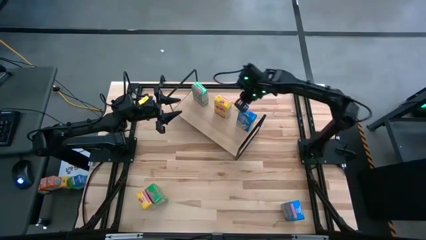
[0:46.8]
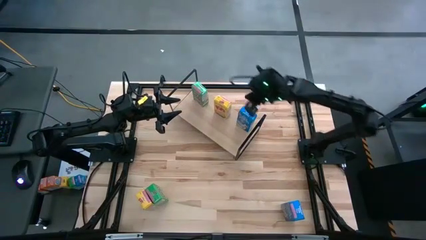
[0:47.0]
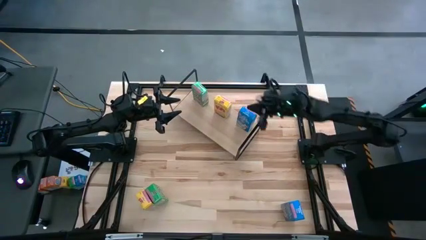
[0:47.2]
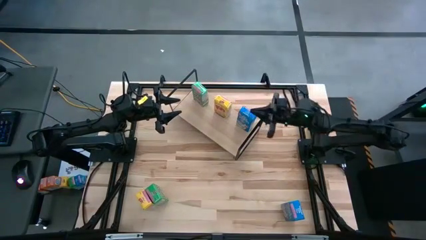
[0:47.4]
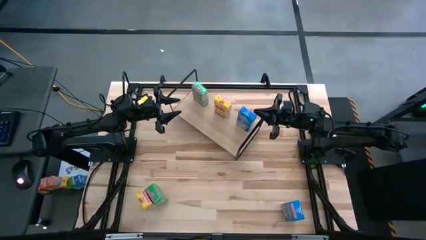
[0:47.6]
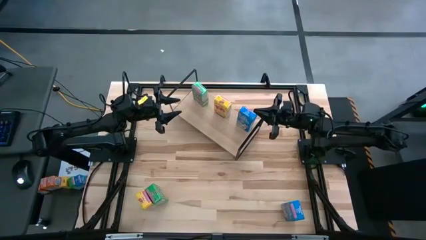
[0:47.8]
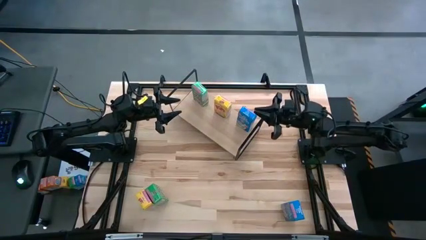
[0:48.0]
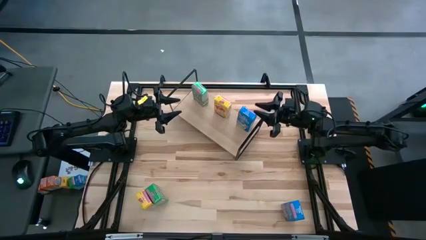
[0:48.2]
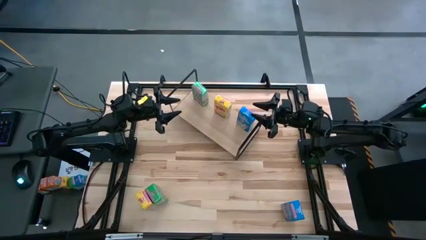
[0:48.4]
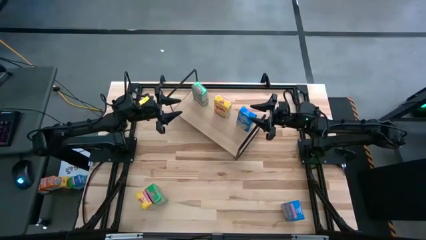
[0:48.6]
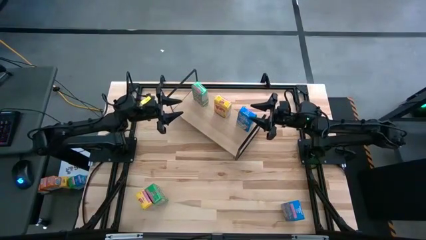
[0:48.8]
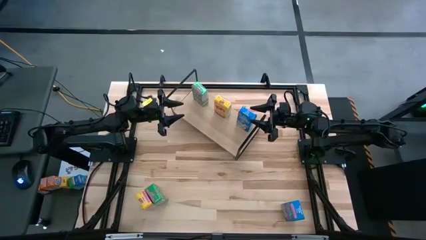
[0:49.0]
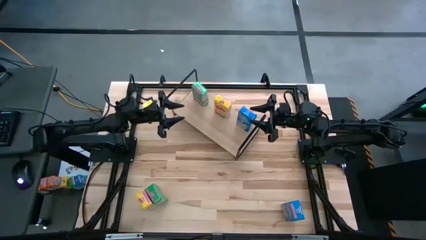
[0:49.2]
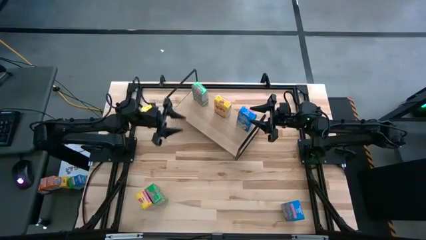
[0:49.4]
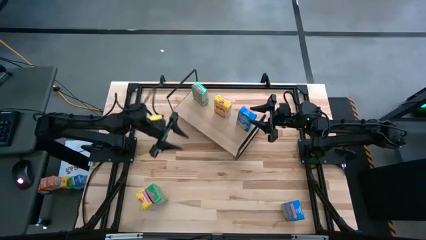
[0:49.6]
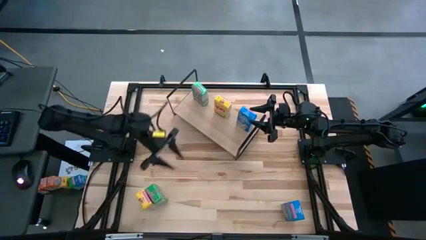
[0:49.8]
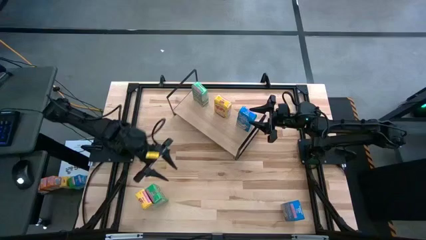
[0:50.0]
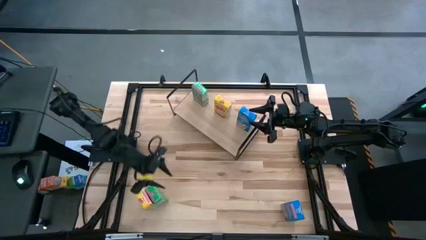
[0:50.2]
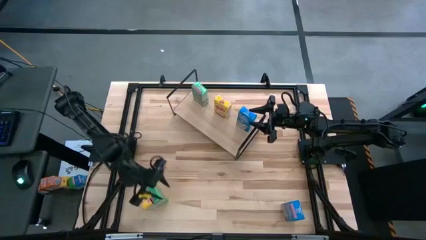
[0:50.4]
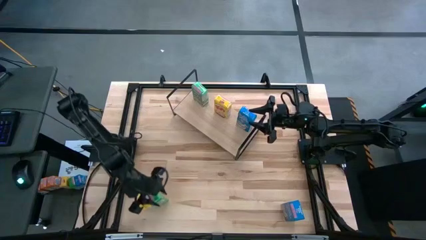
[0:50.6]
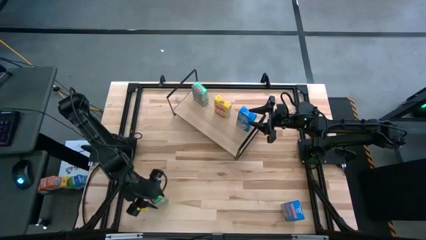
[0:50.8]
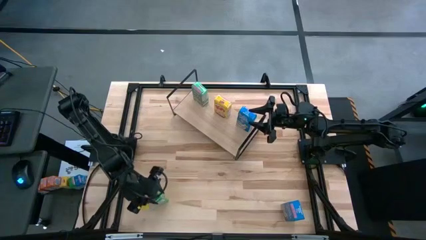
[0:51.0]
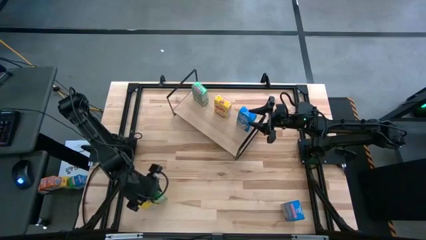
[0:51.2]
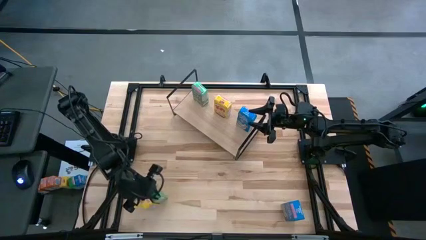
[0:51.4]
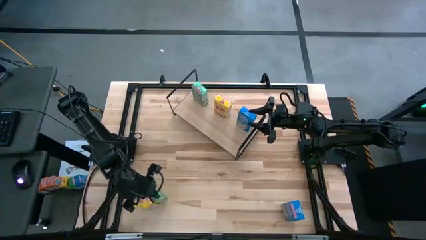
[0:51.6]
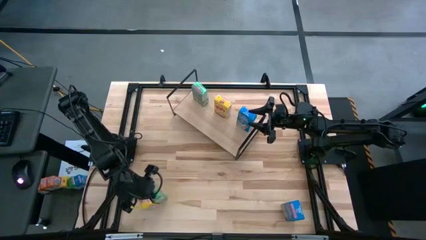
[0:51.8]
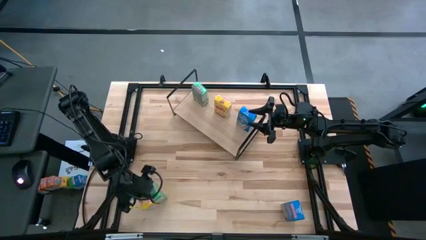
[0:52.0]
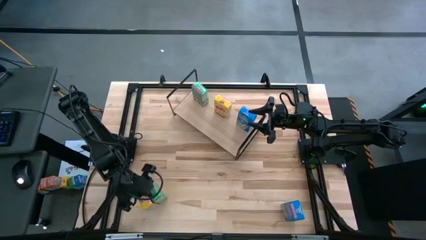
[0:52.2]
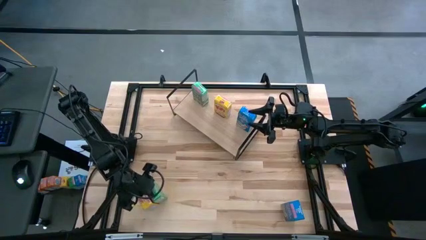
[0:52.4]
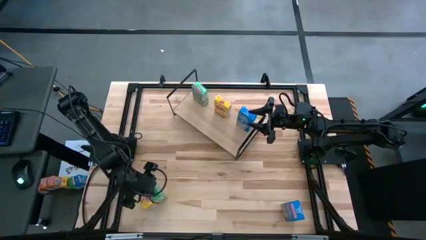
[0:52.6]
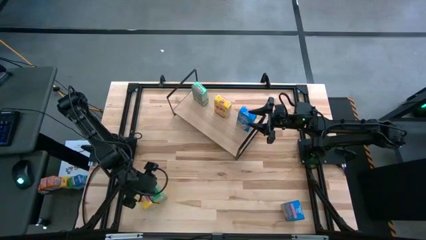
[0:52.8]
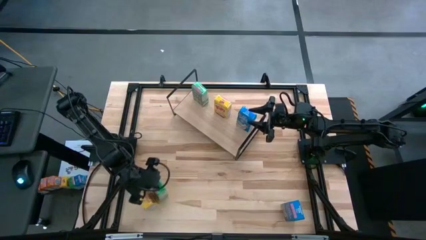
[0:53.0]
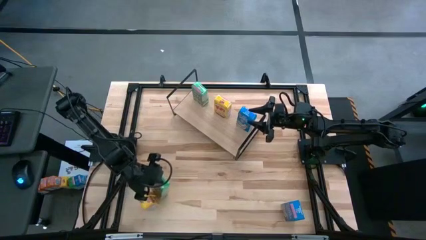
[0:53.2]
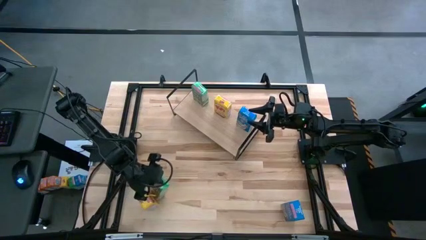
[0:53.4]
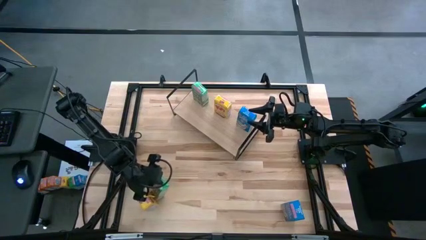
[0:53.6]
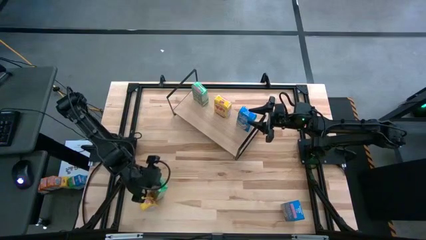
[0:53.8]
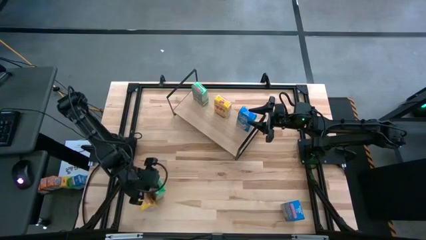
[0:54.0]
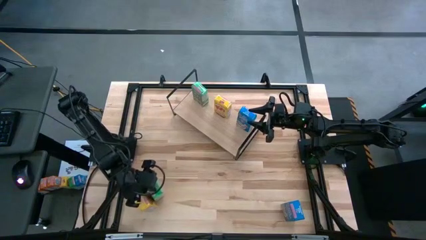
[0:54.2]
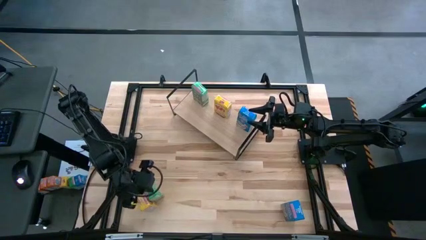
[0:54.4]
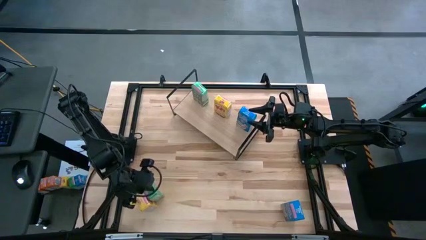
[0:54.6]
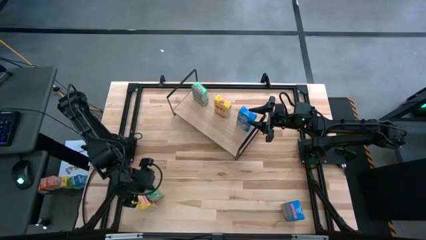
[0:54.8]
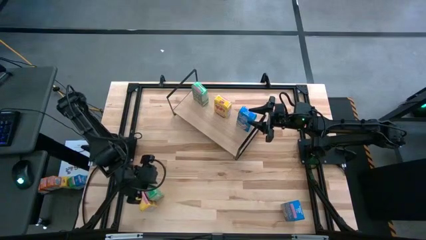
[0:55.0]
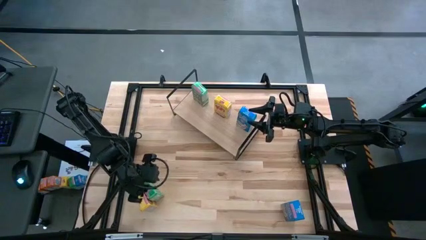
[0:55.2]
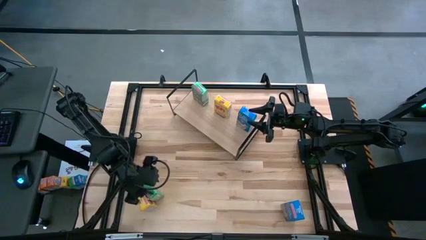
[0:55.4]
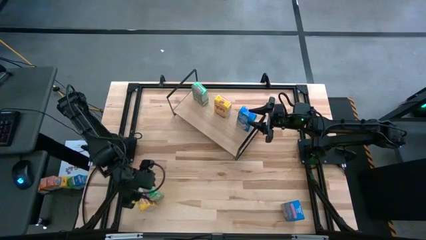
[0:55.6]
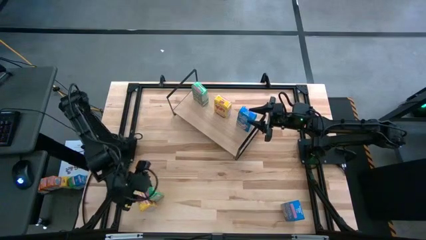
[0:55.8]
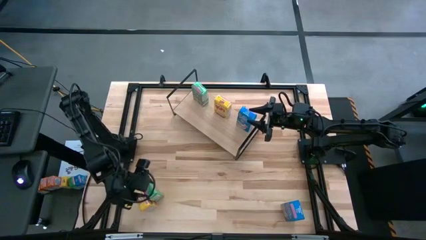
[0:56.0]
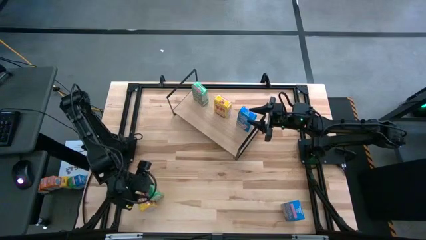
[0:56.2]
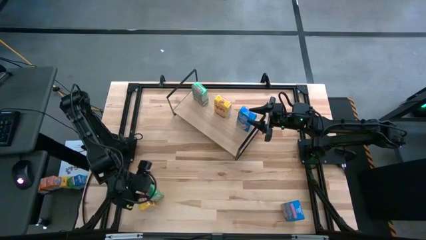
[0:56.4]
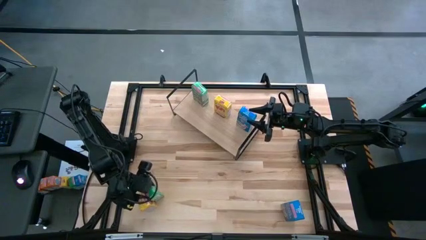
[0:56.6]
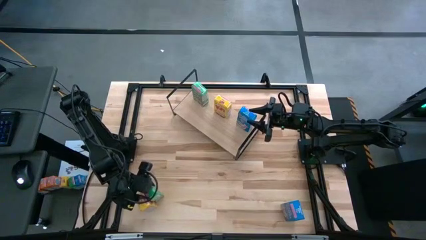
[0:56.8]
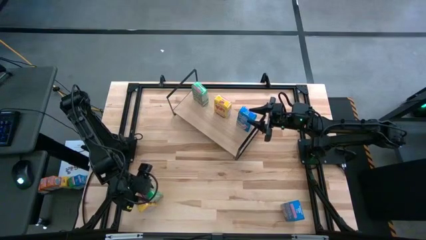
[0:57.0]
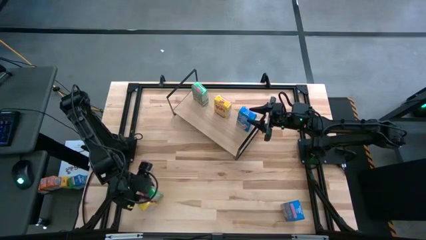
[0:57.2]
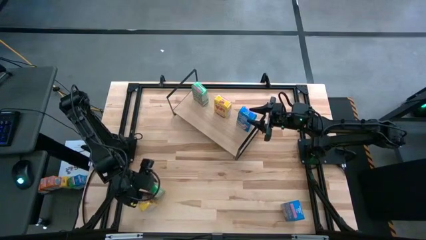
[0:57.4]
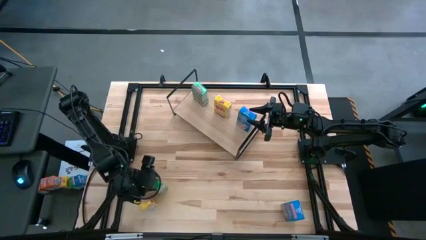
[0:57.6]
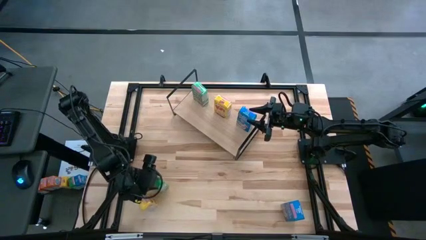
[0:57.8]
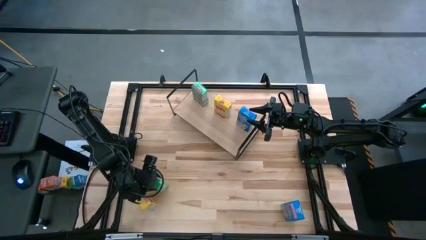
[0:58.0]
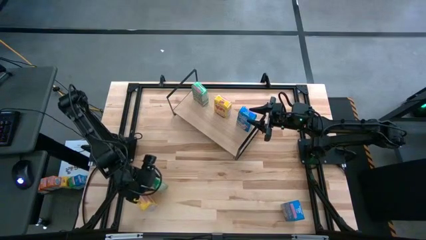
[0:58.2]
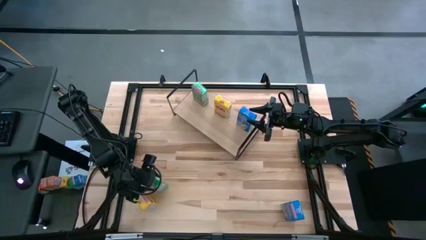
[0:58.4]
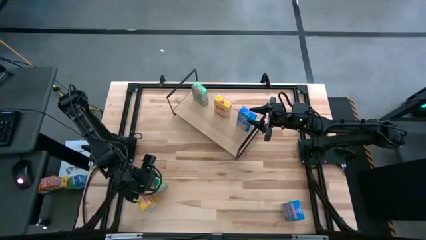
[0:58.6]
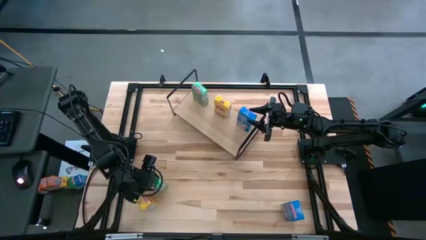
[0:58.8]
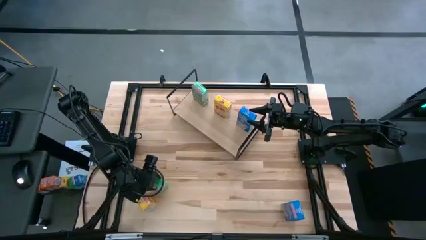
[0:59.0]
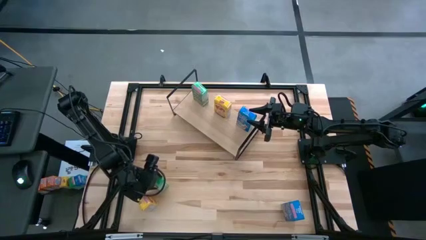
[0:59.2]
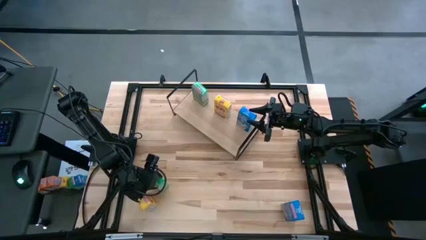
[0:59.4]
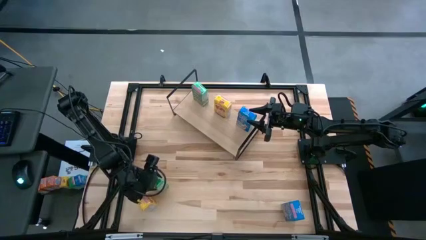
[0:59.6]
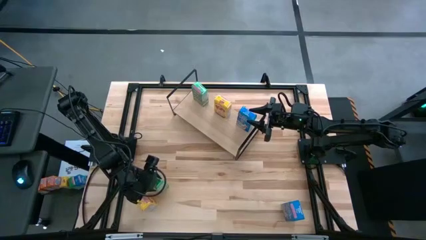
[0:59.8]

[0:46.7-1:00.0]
Task: Stack cereal on shelf
Put the green cereal box on the shelf aligned with the other green cereal box

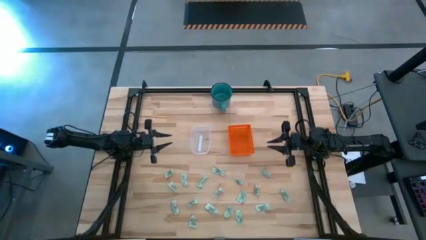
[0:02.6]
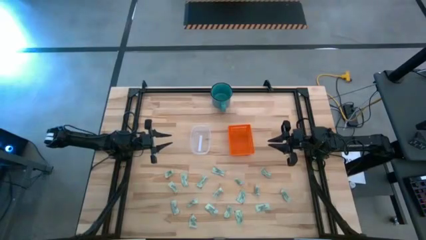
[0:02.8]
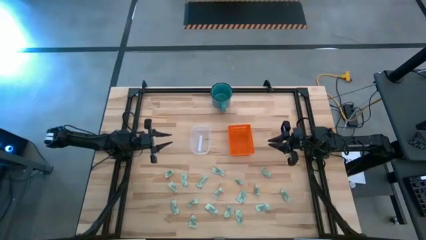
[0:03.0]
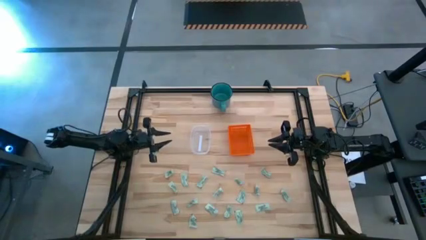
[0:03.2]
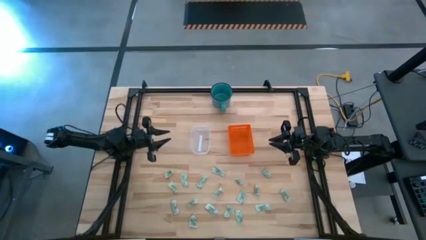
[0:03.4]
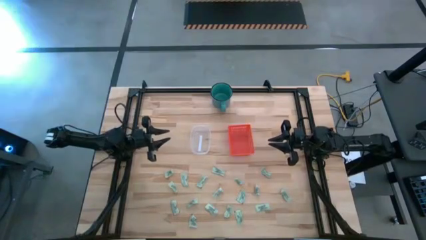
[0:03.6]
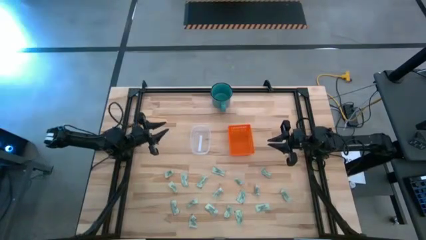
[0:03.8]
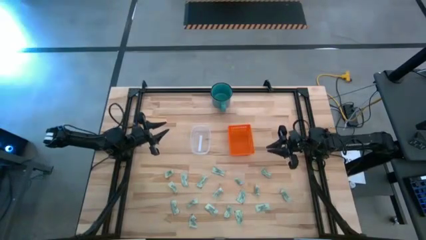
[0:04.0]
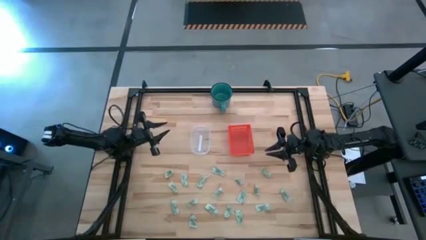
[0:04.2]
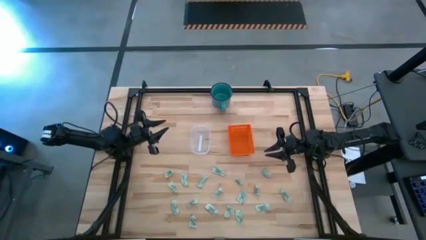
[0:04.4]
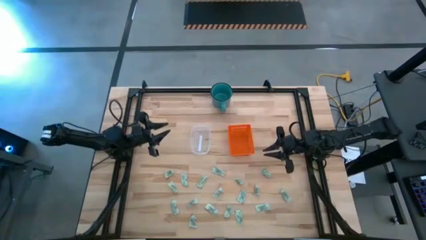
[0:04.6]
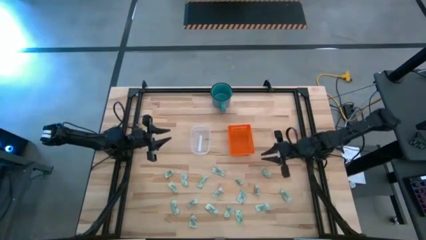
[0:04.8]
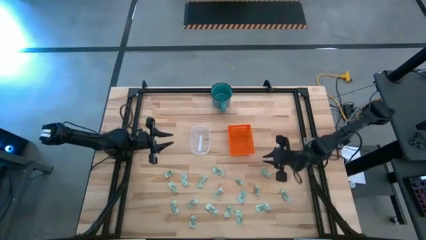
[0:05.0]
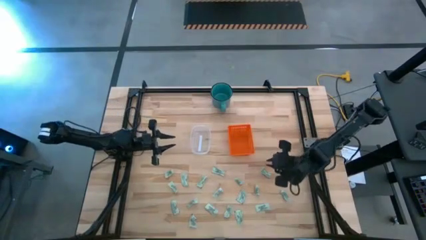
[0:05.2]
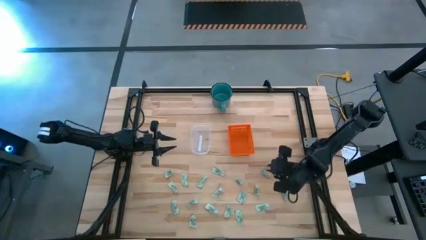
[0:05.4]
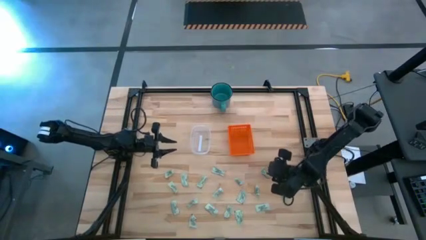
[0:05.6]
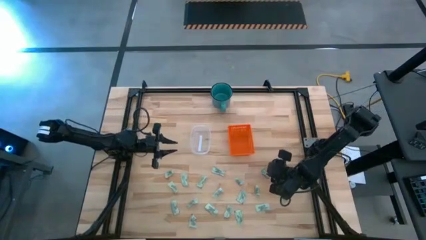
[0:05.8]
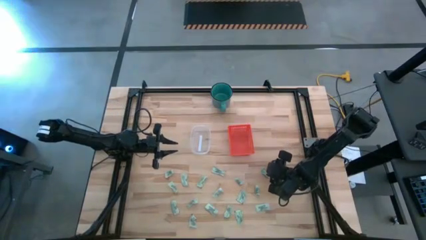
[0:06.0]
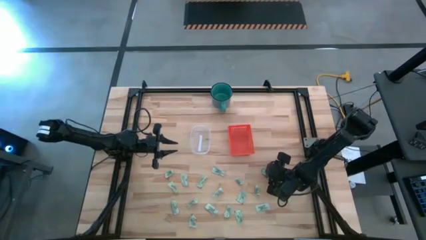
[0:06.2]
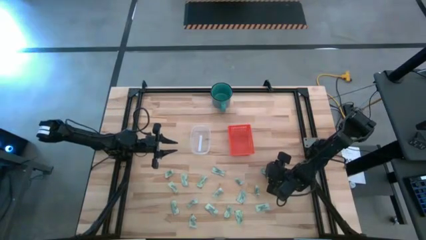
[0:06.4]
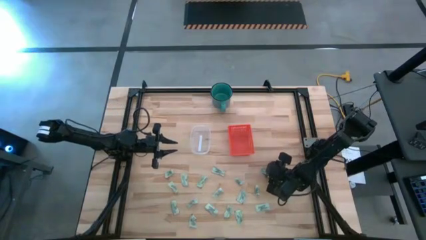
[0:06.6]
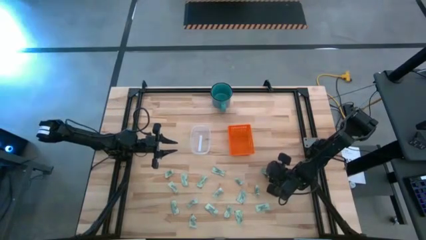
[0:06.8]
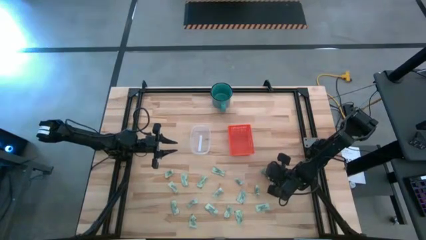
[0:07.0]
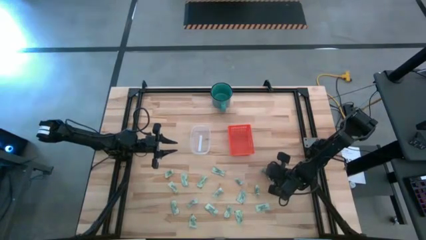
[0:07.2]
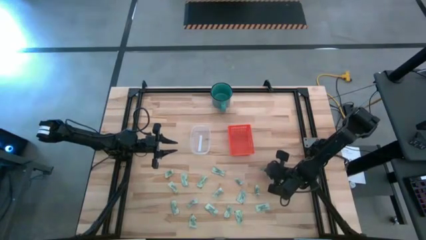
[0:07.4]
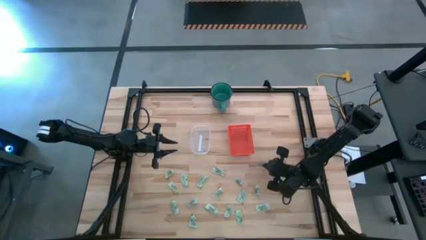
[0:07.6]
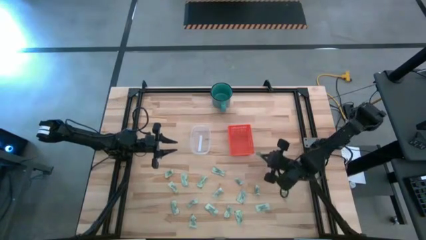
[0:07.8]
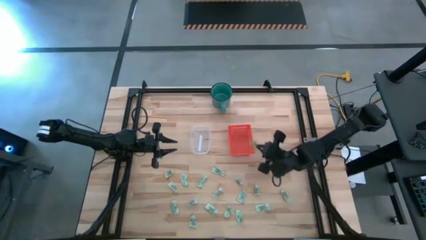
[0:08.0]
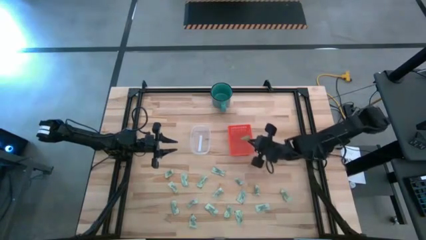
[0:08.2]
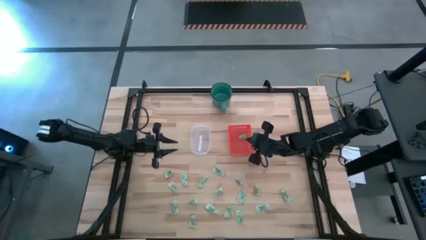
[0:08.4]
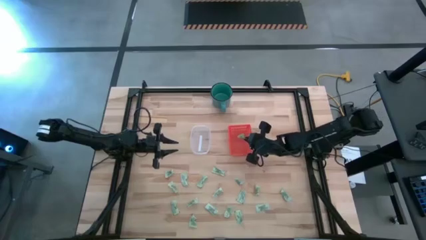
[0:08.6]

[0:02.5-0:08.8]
Task: Pick and place items into bin
Put the stevia packet into the orange bin
